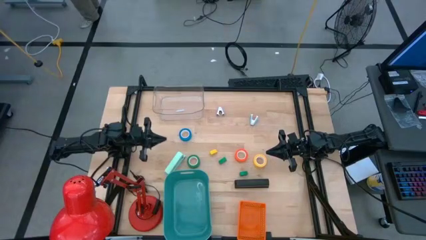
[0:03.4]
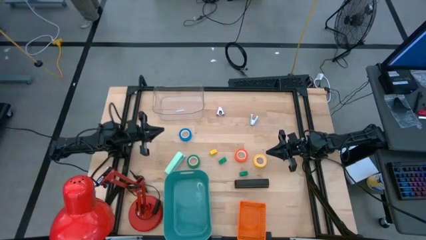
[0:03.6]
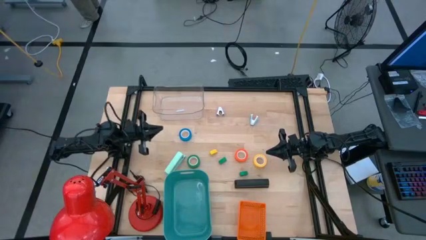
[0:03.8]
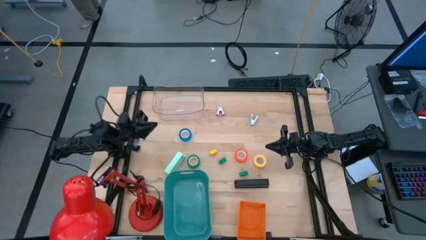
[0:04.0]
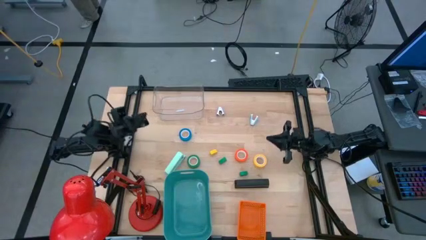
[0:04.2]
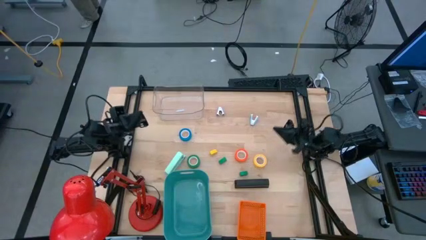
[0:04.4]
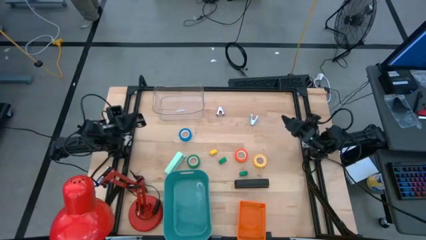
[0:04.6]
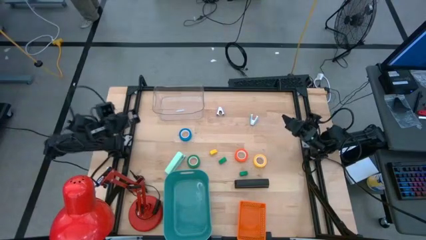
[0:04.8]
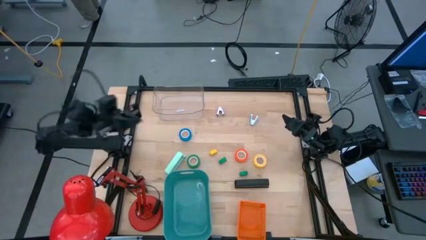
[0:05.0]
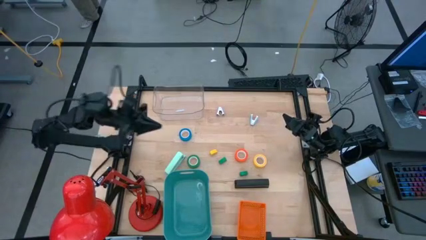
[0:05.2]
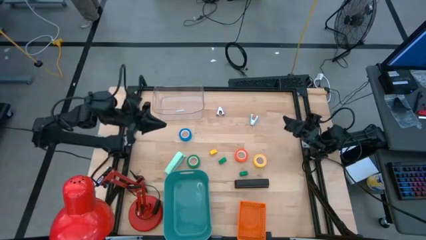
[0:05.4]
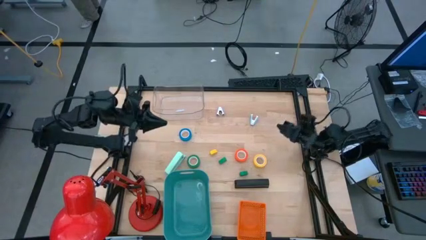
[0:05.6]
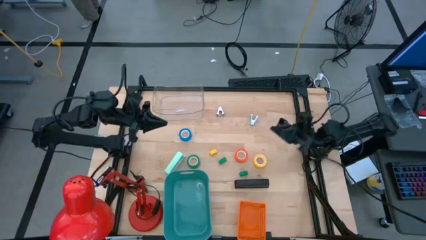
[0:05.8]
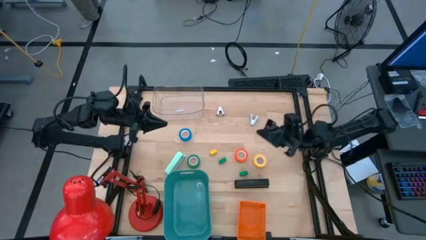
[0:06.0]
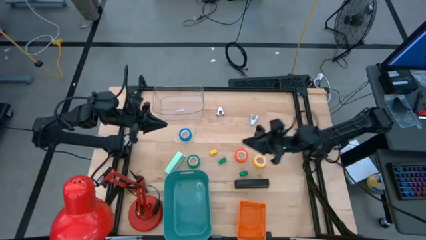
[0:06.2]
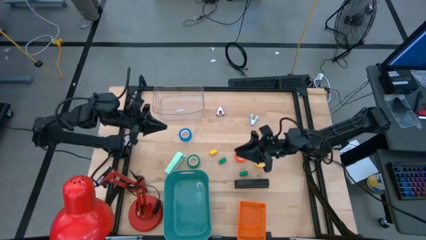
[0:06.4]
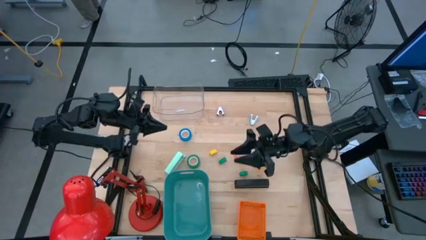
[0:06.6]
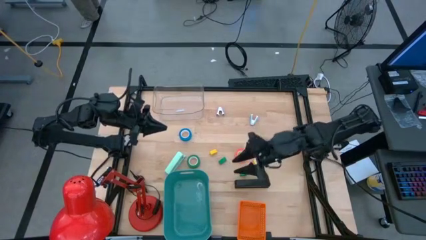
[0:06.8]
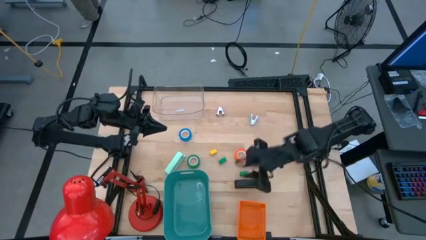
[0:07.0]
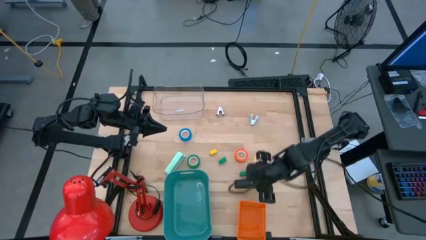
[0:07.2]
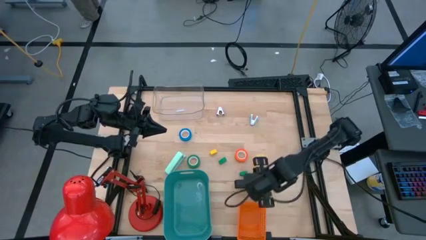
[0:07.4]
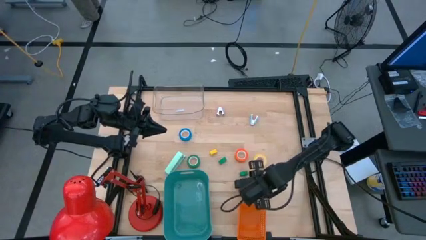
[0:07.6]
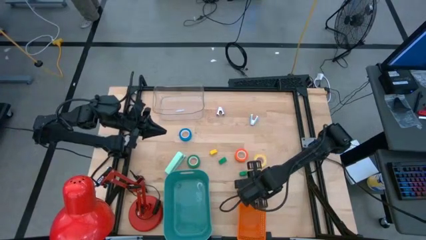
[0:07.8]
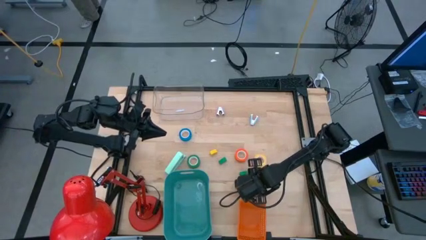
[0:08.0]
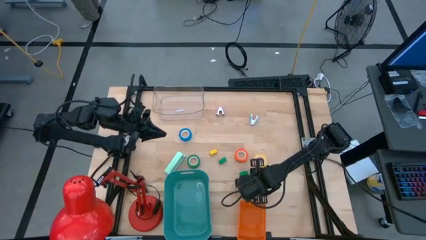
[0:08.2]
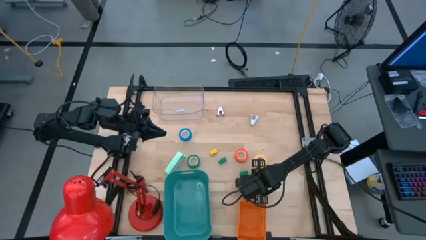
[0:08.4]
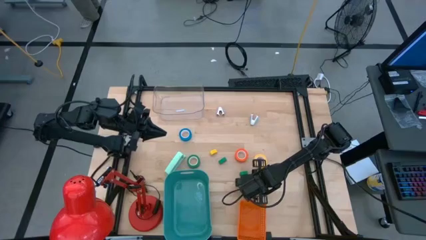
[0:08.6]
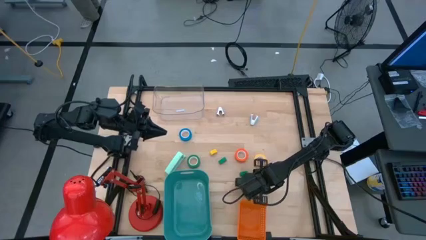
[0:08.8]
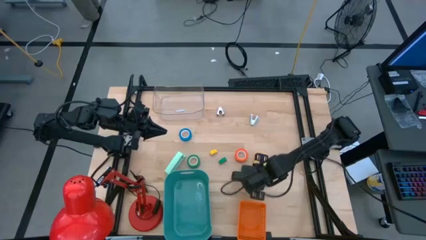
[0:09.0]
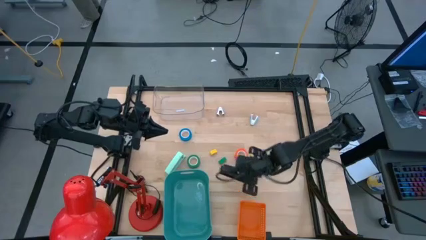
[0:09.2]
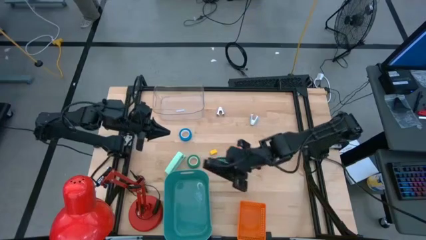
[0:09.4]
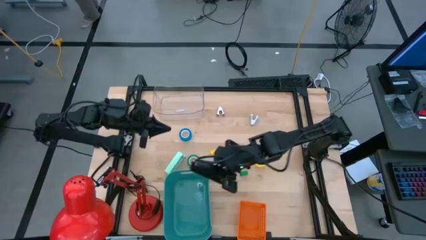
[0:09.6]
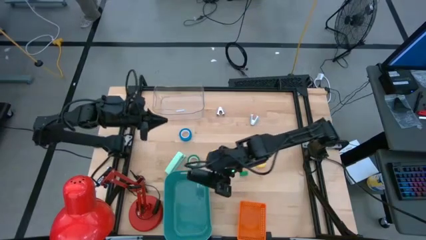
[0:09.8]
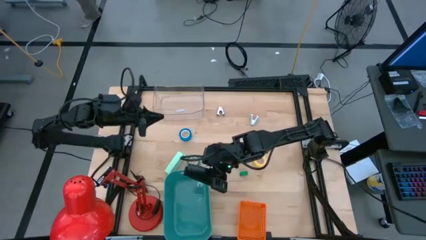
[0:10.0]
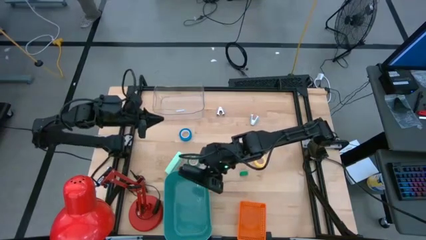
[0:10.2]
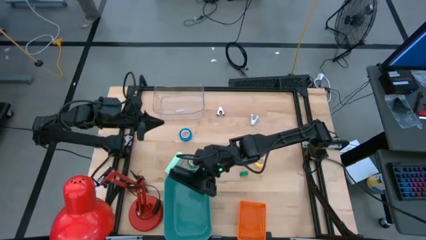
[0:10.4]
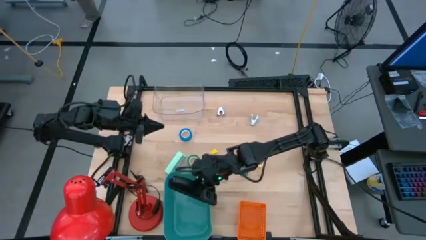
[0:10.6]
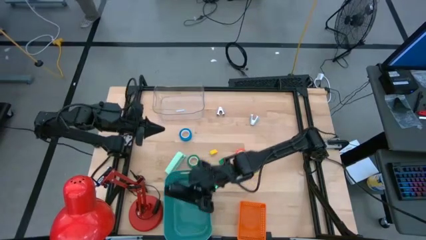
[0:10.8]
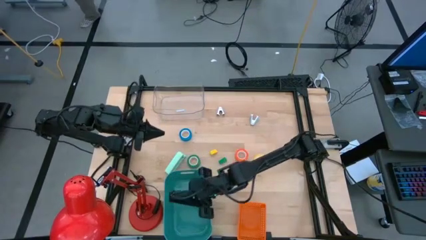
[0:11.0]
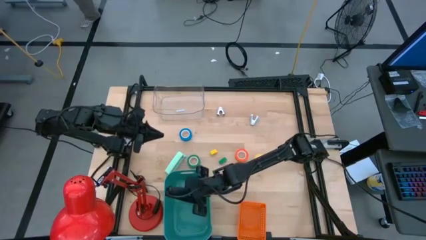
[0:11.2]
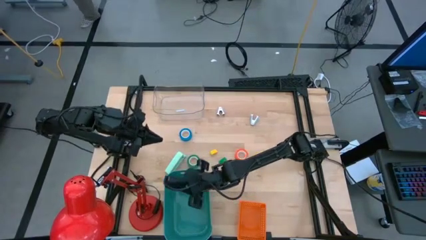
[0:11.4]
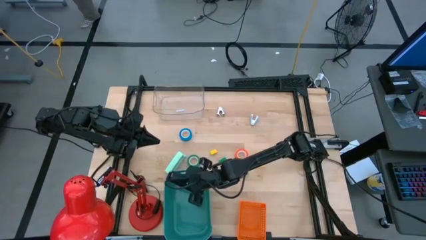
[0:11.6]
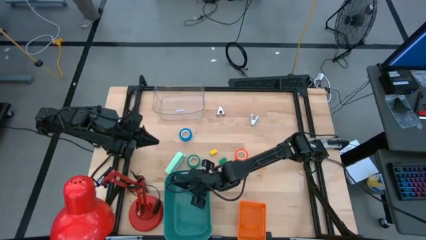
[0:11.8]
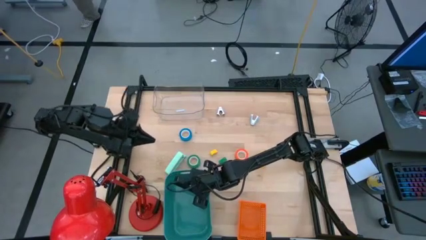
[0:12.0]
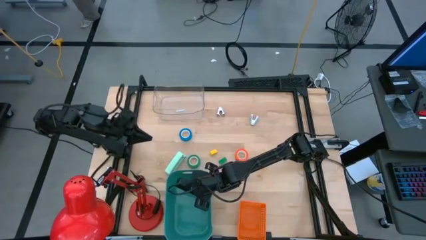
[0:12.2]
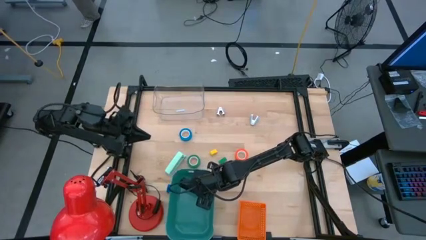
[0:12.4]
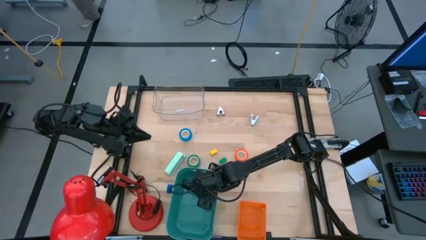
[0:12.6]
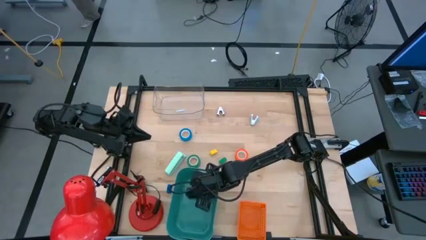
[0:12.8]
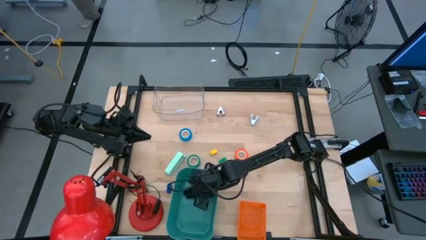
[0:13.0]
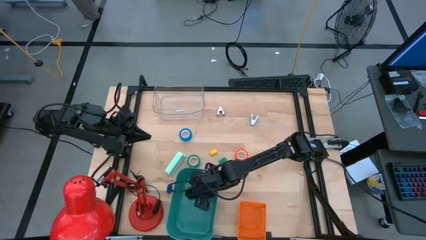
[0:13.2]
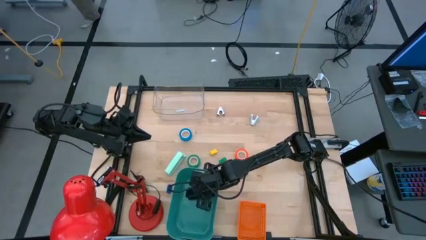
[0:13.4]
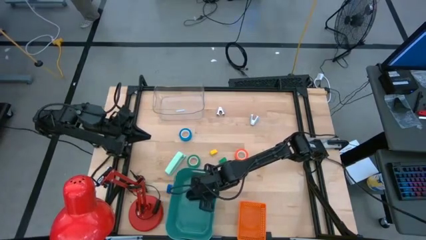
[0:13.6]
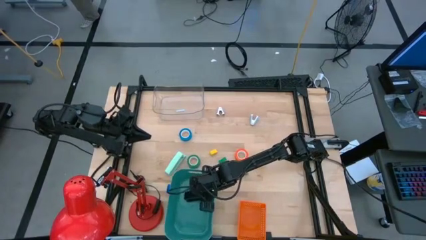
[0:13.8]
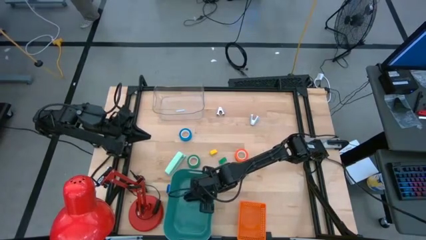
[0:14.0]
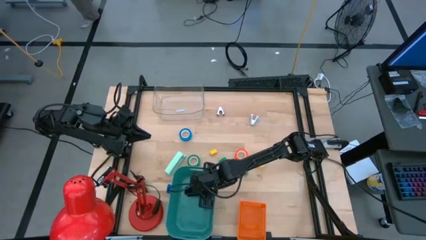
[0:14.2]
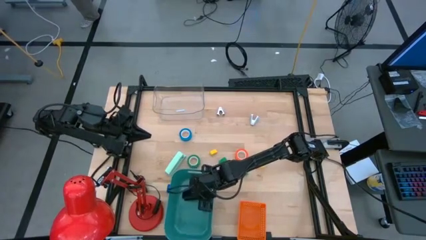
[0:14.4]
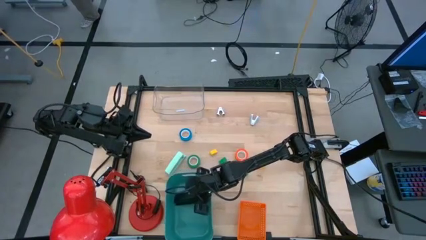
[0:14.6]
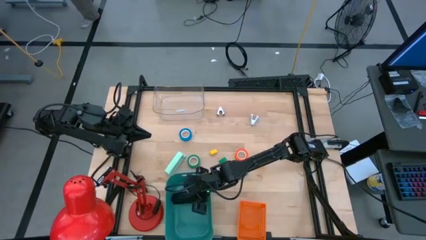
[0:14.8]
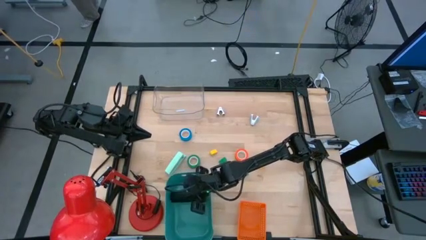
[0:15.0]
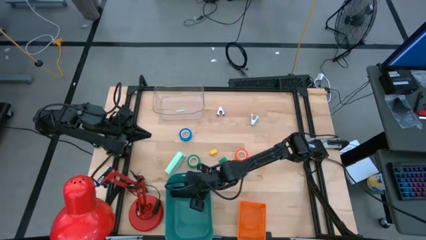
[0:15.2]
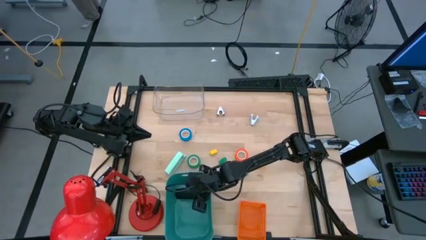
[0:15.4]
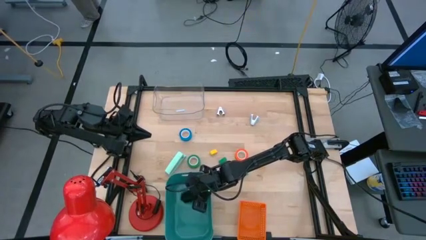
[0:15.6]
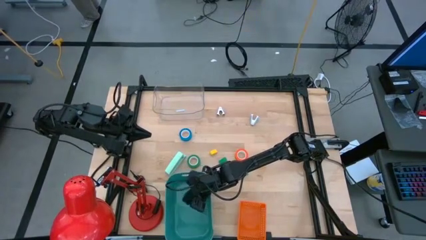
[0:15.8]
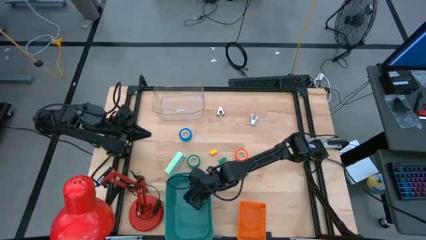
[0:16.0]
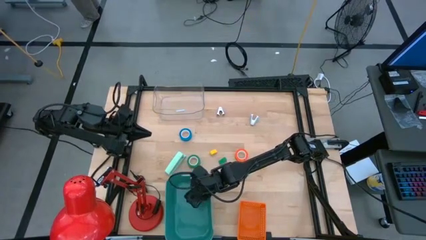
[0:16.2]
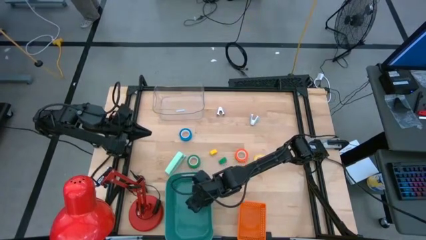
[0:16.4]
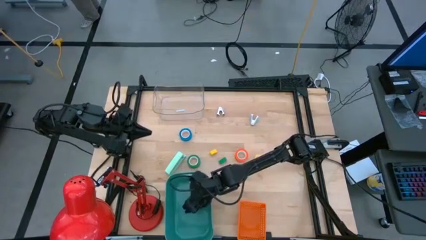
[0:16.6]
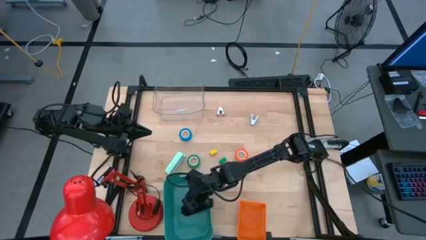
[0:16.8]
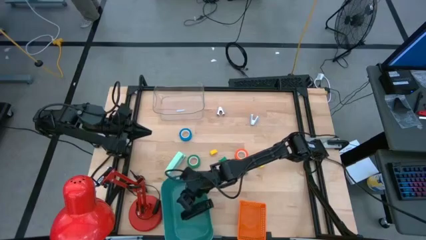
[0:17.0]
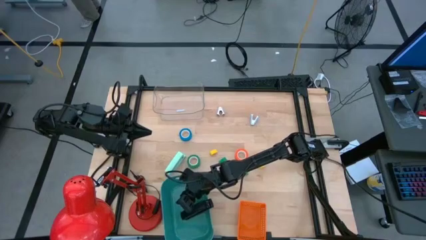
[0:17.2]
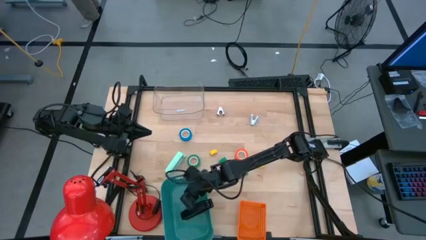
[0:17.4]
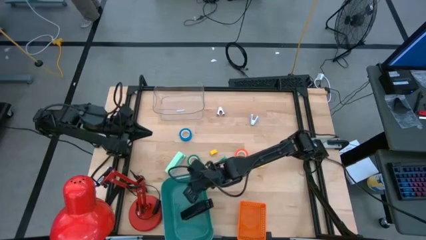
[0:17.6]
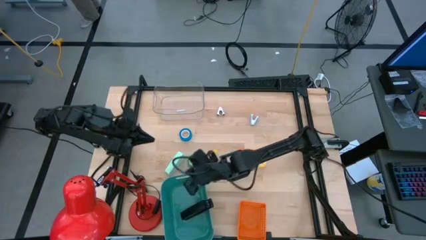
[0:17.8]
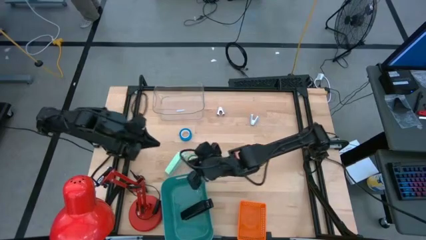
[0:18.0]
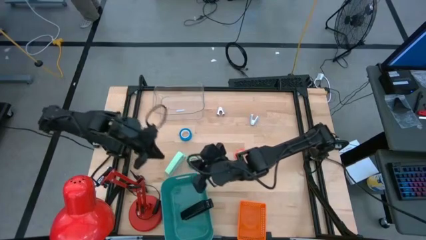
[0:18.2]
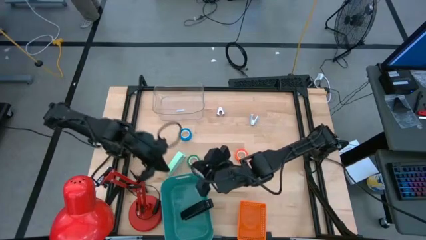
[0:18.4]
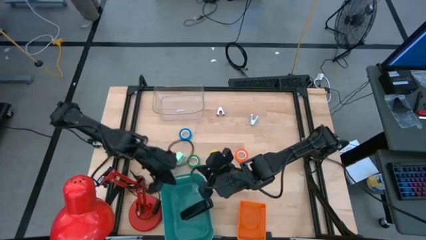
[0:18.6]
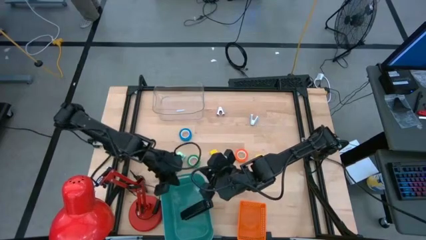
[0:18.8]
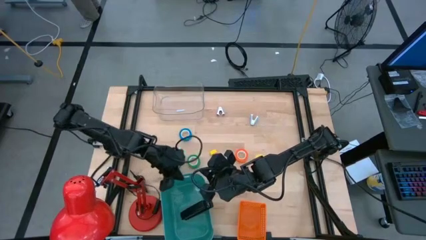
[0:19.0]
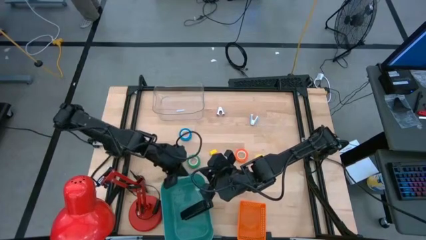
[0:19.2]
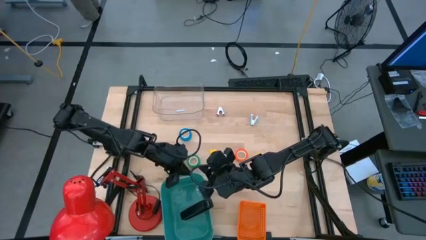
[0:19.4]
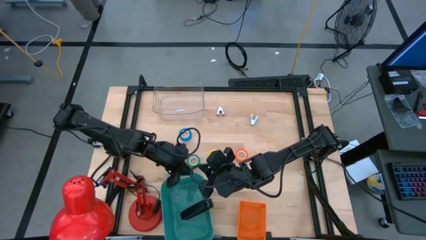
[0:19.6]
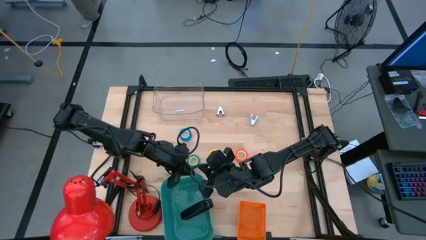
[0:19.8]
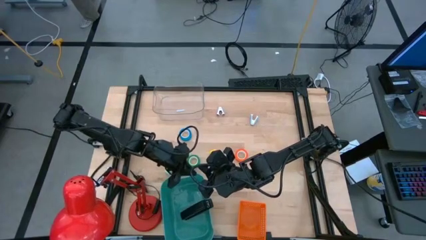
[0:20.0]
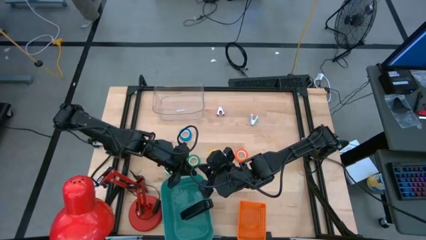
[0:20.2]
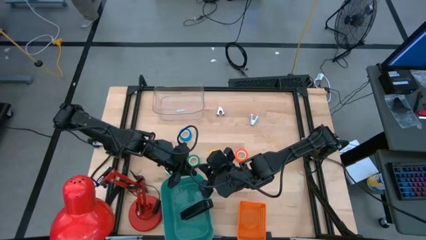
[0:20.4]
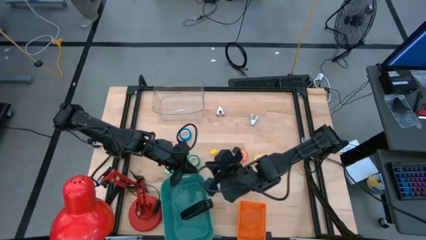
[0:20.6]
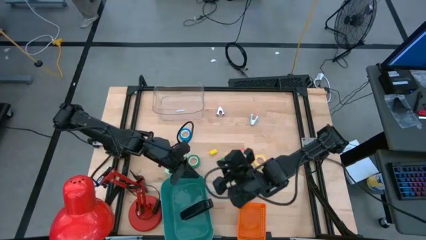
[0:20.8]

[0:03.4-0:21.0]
Task: Pick and place Stapler, Stapler remover, tape
Put the black stapler into the green bin
